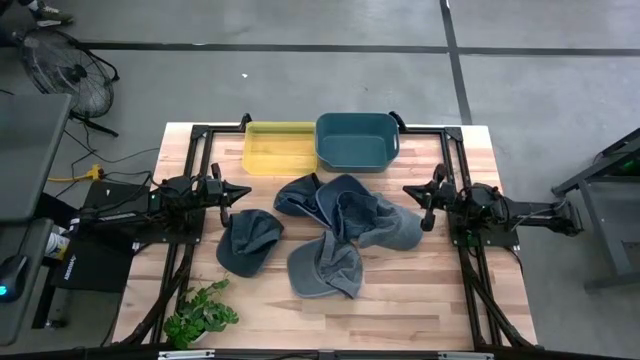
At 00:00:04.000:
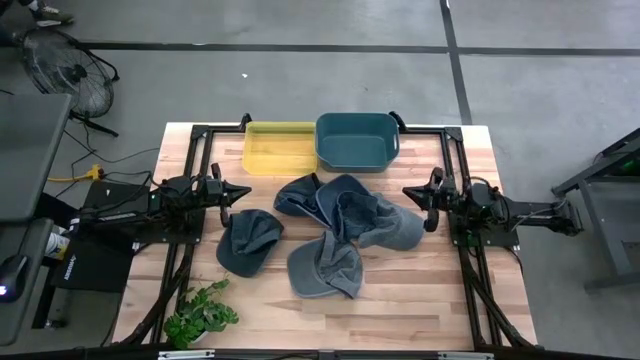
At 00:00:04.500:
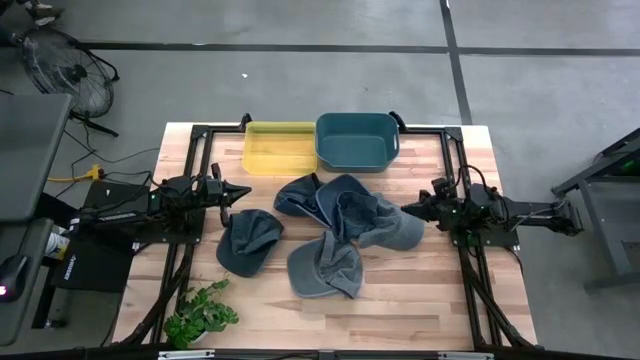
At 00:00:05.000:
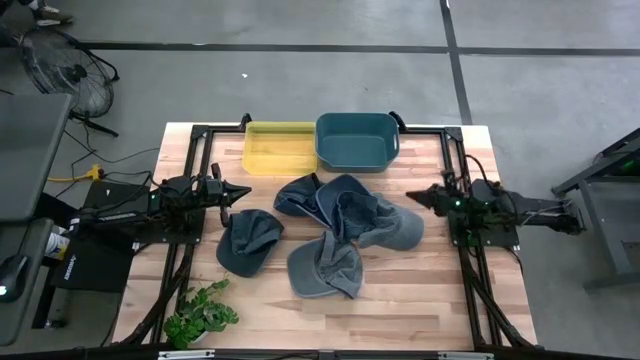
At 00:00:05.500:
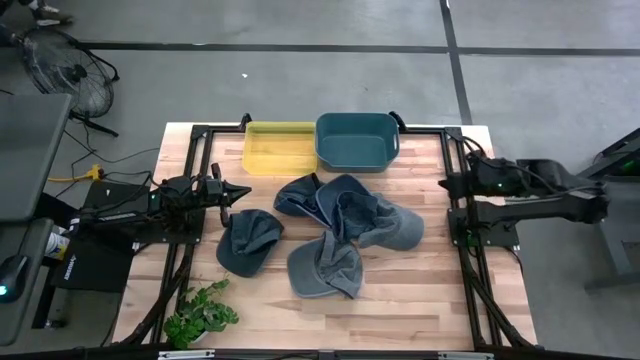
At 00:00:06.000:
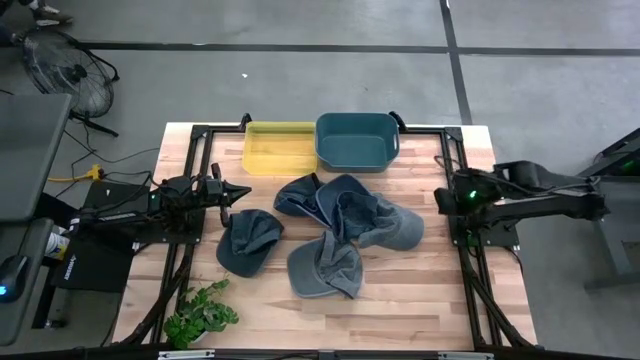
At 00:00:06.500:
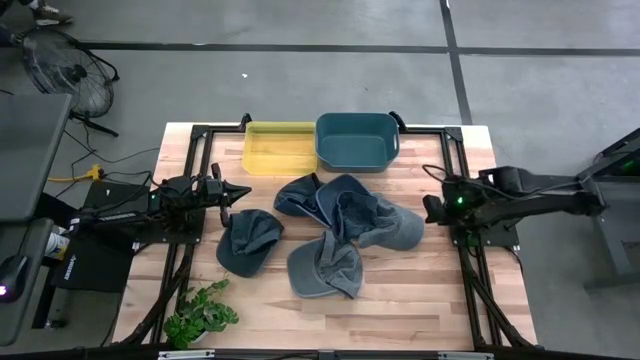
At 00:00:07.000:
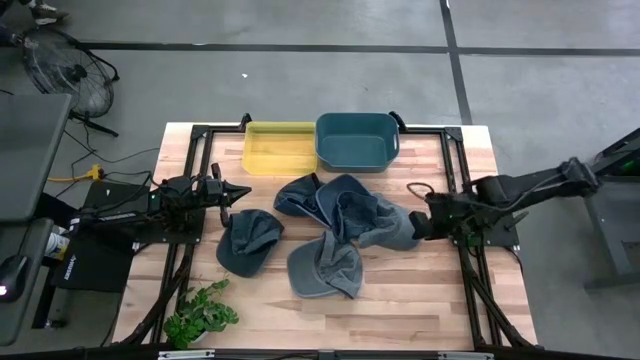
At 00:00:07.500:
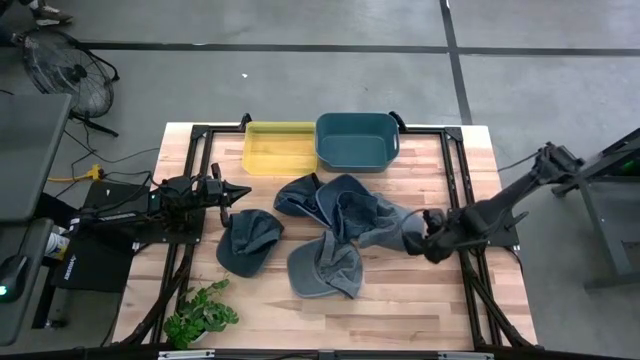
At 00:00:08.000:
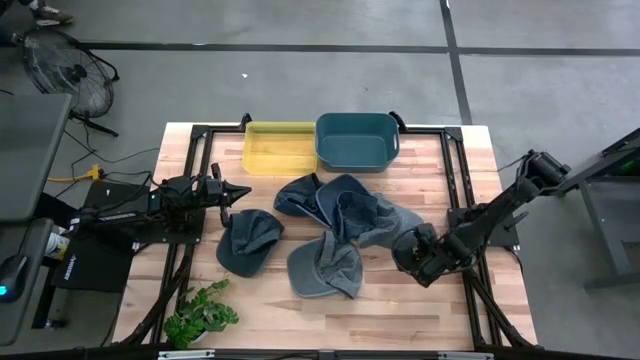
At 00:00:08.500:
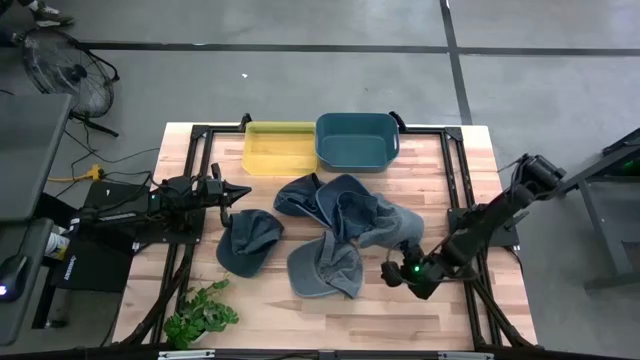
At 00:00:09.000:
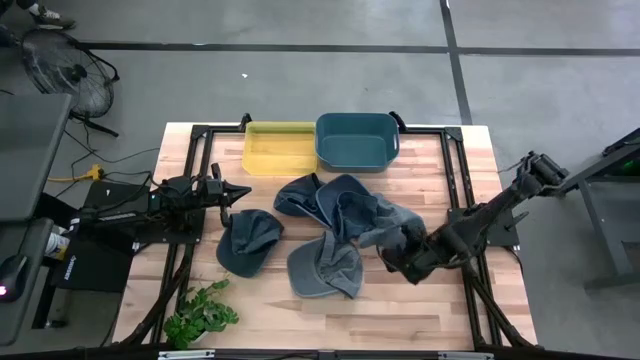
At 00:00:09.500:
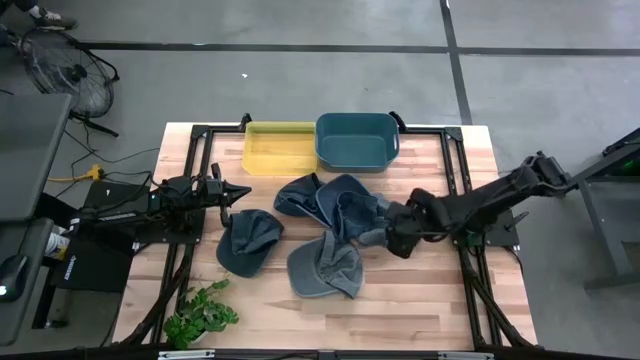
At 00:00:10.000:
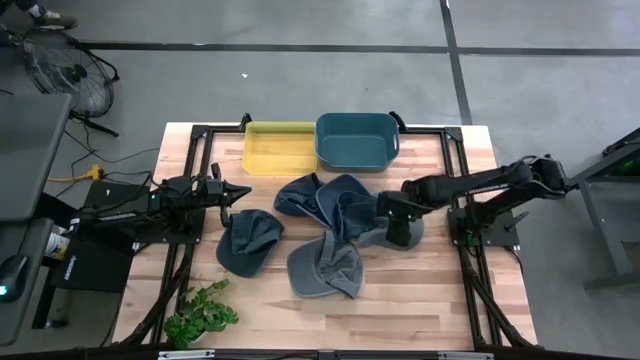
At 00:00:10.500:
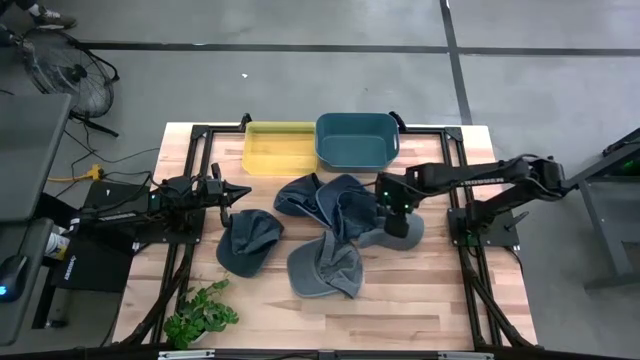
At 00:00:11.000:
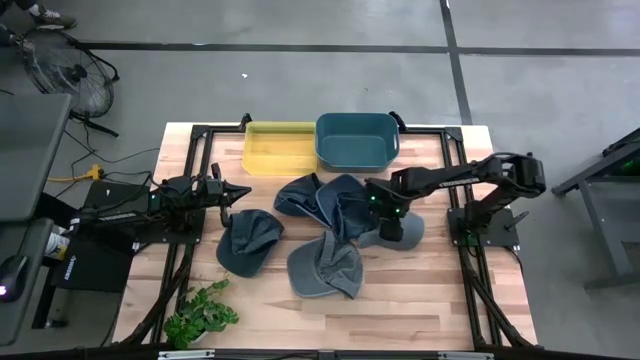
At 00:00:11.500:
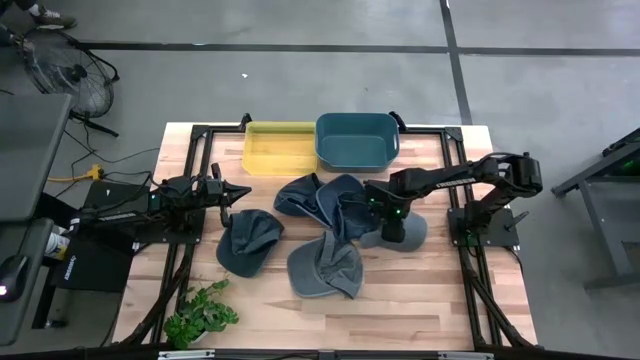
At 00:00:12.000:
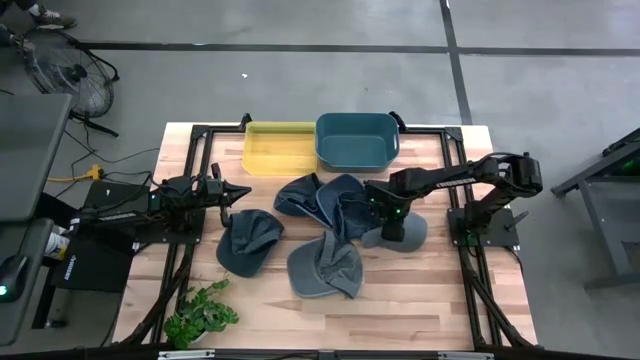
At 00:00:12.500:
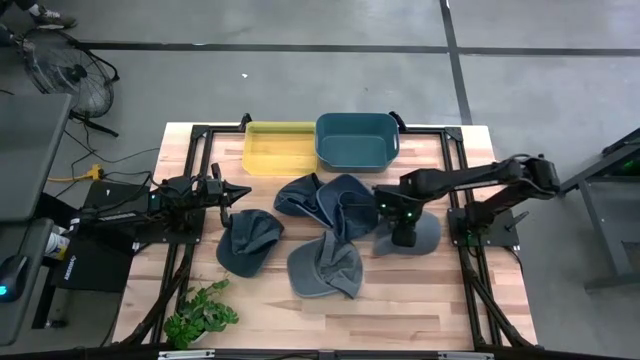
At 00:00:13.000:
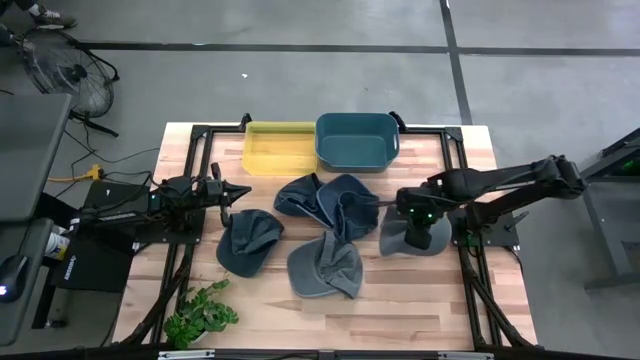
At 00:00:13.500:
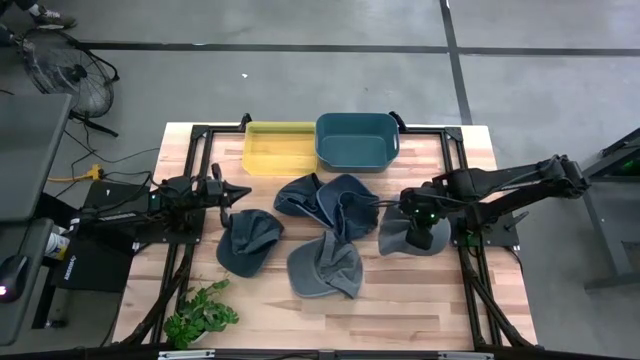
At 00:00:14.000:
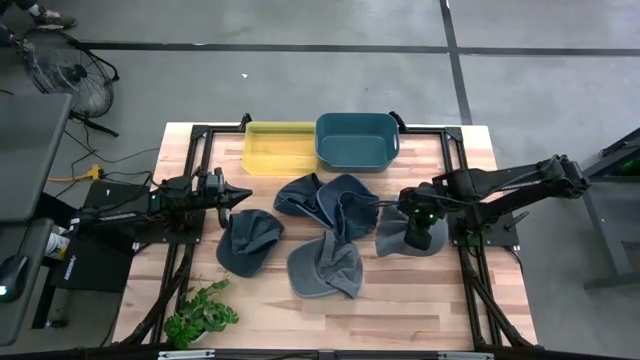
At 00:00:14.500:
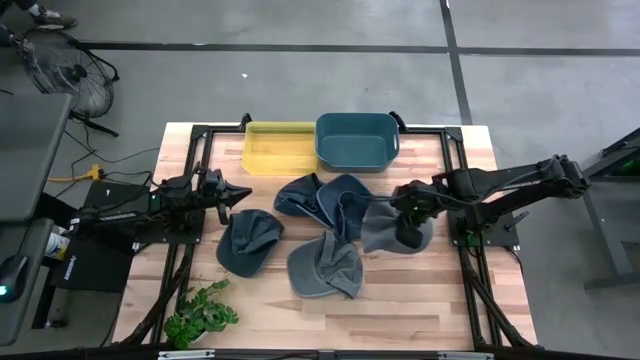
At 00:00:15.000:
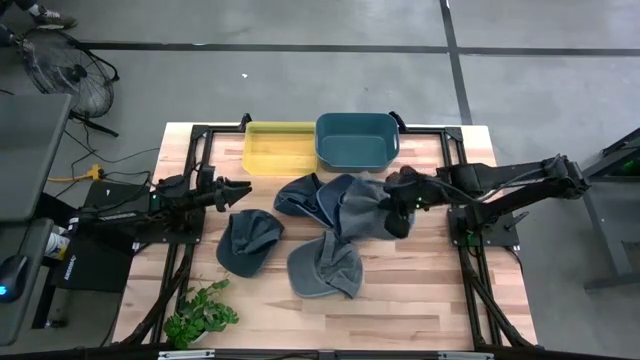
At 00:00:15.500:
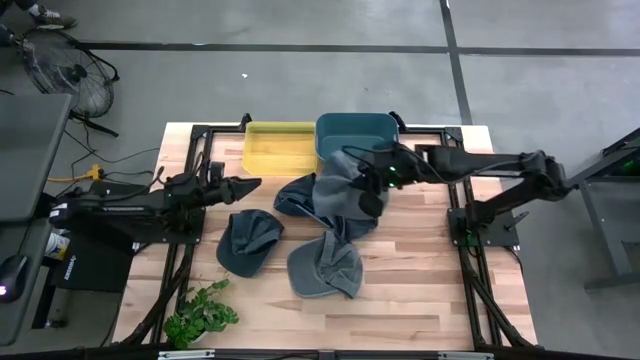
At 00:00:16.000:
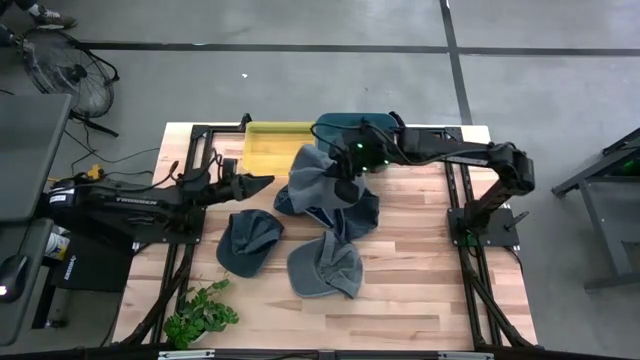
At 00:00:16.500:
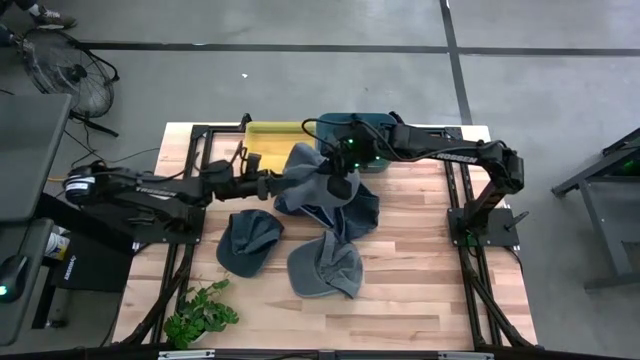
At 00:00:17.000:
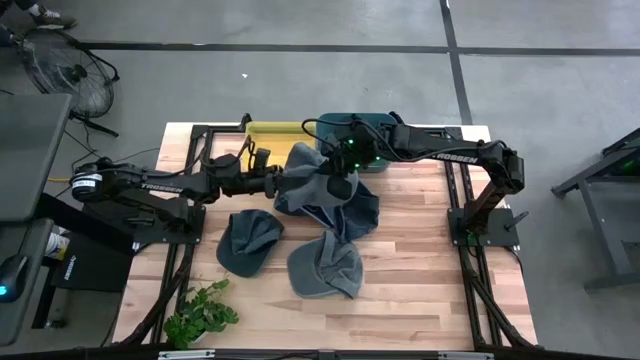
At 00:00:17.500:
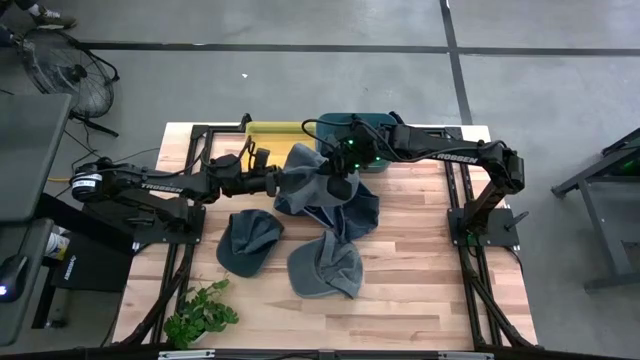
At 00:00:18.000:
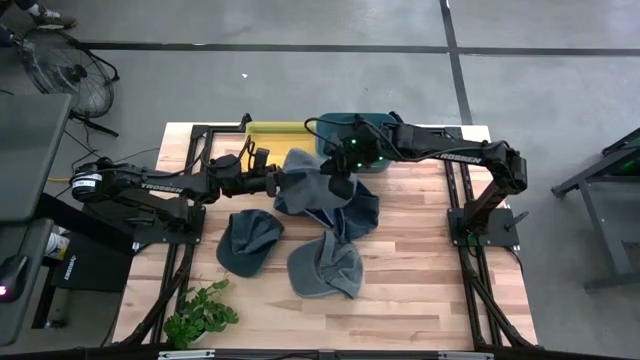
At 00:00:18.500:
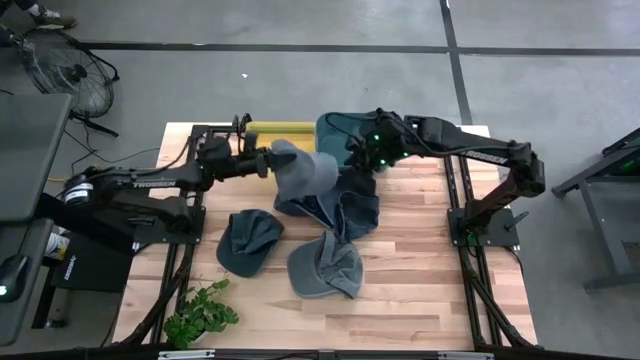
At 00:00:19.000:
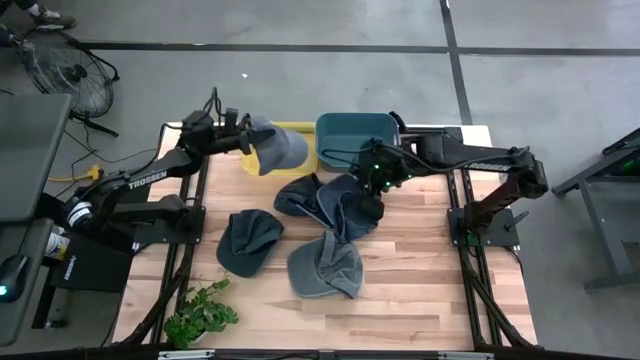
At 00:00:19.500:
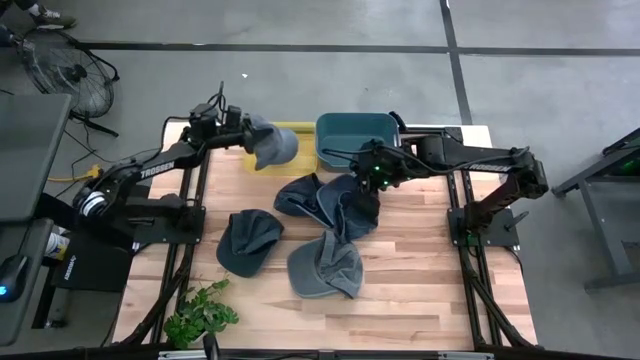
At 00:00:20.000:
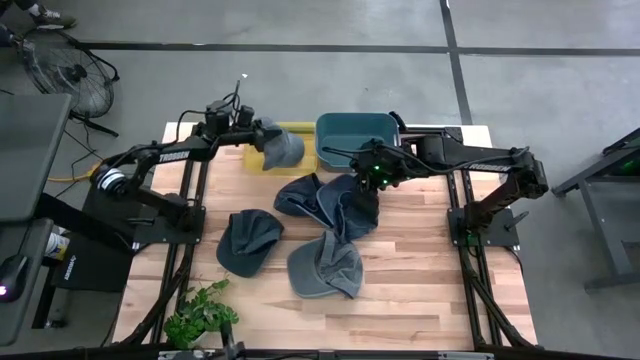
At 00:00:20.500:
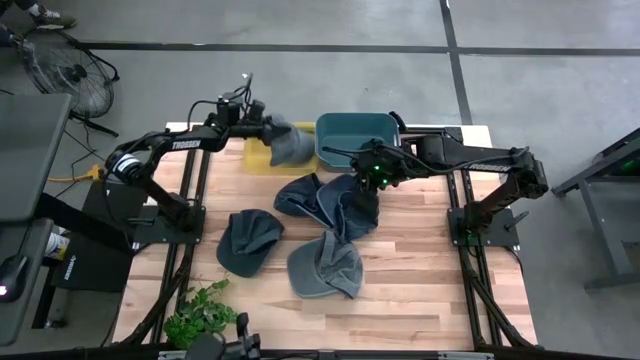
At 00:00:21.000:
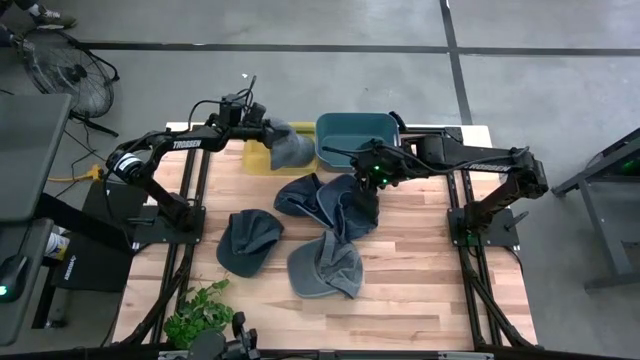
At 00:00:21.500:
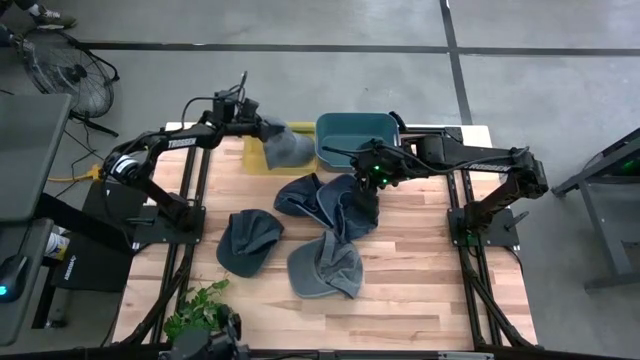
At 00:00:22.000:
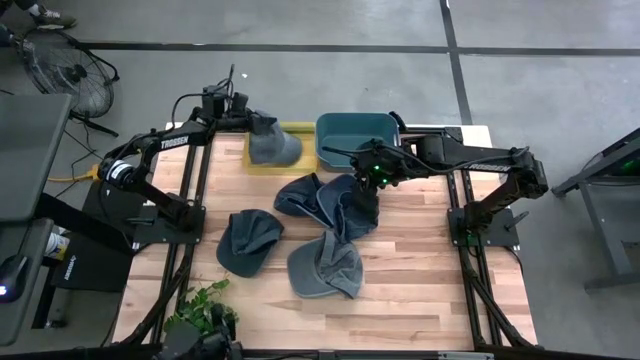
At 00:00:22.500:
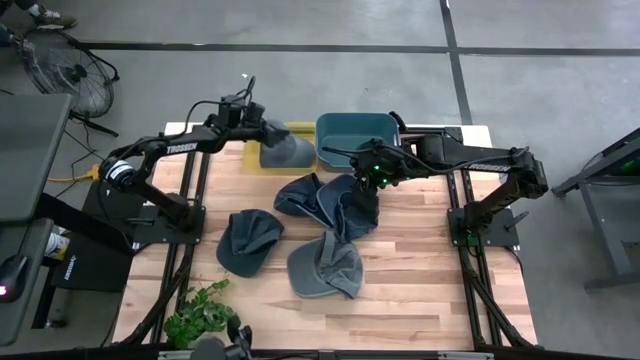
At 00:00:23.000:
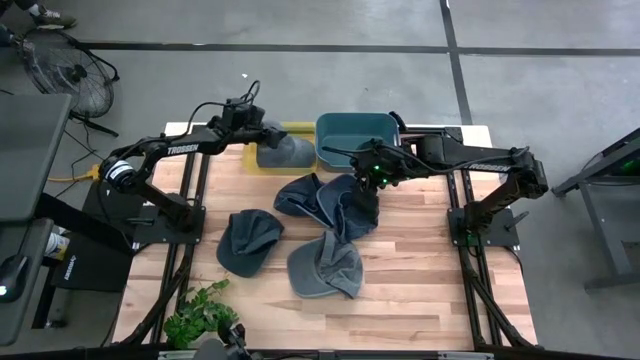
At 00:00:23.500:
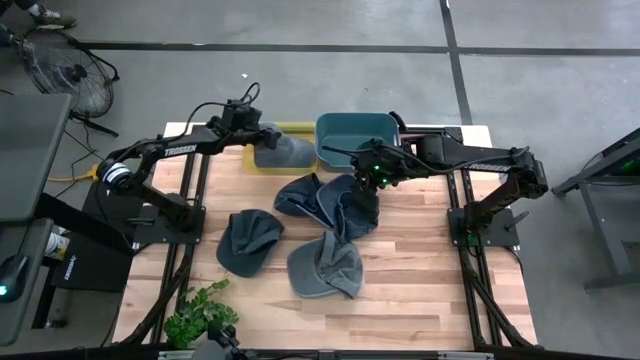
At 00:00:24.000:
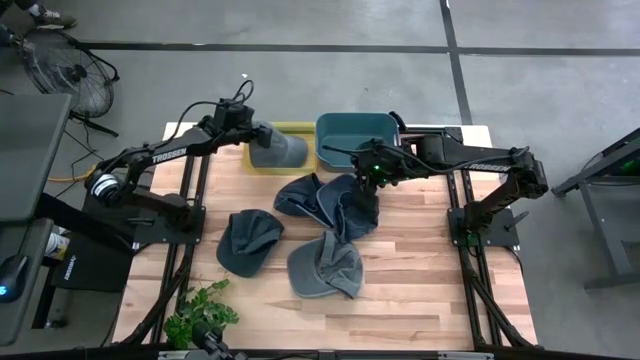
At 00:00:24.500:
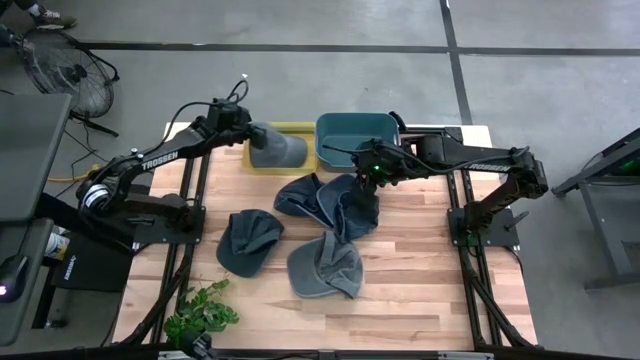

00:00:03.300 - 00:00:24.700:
Task: Pick & Place hat
Put the right gray cap into the yellow bin
